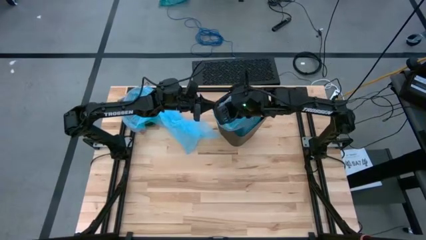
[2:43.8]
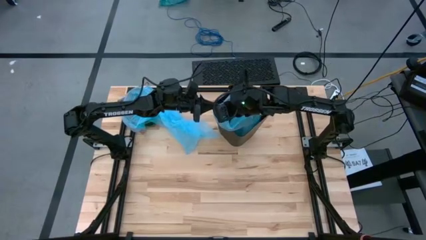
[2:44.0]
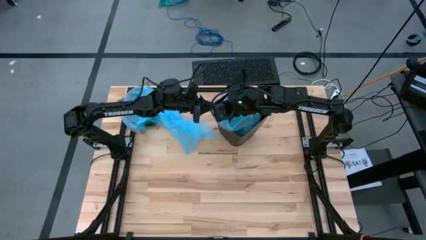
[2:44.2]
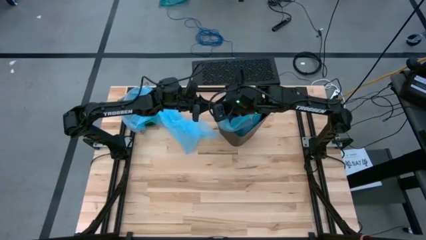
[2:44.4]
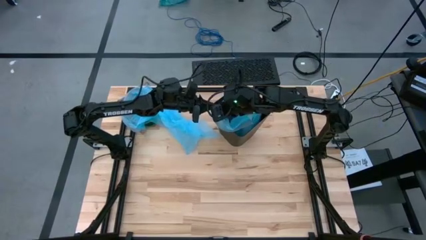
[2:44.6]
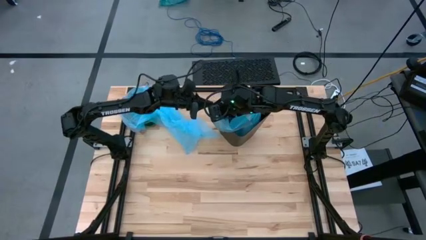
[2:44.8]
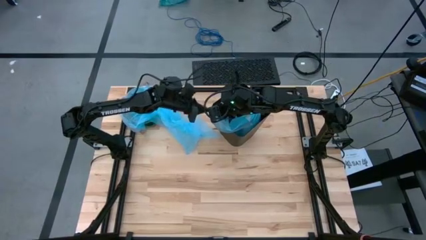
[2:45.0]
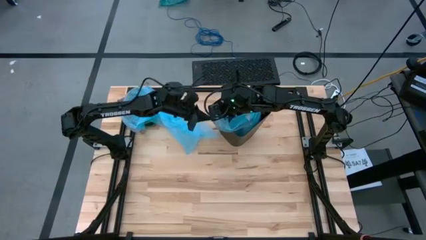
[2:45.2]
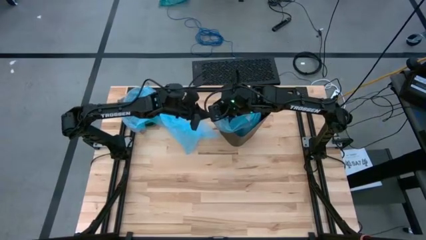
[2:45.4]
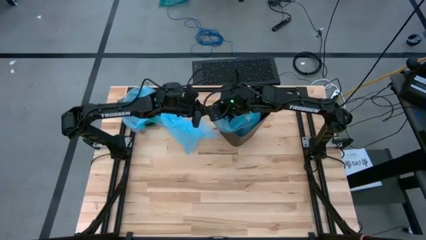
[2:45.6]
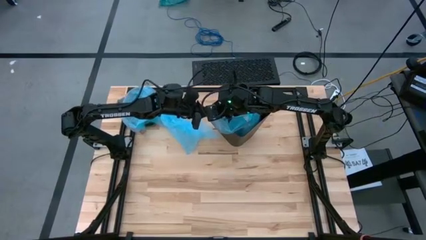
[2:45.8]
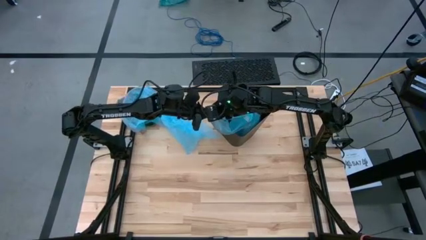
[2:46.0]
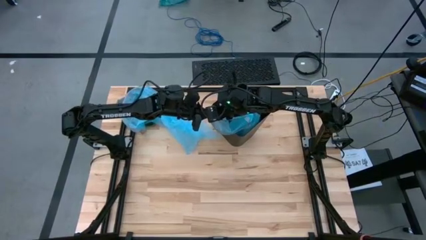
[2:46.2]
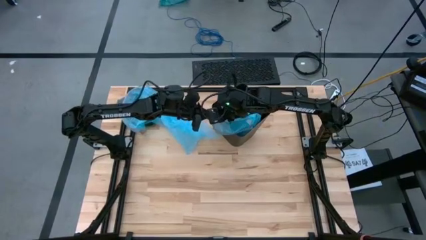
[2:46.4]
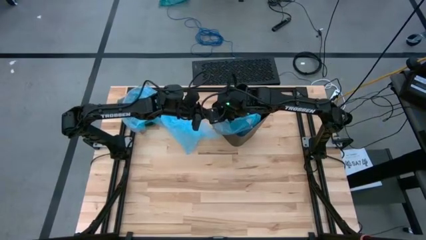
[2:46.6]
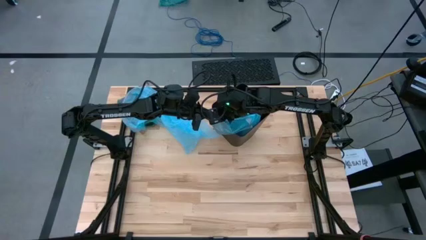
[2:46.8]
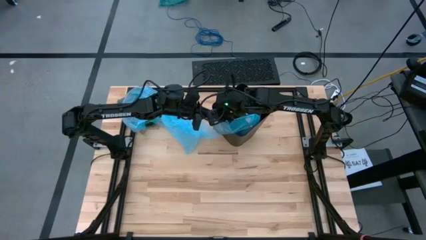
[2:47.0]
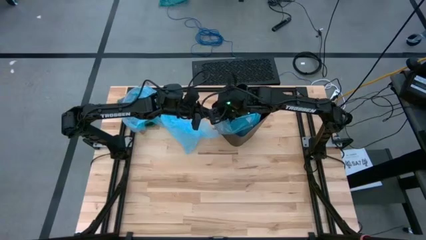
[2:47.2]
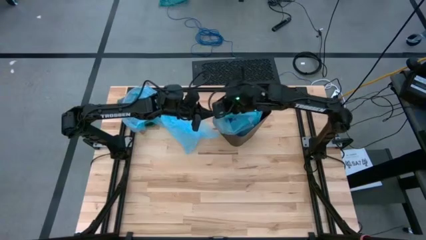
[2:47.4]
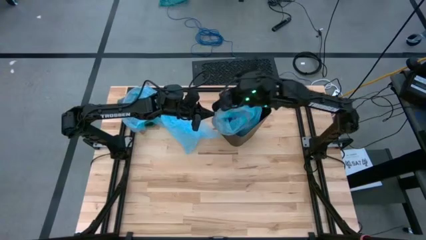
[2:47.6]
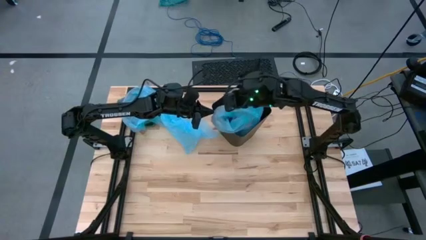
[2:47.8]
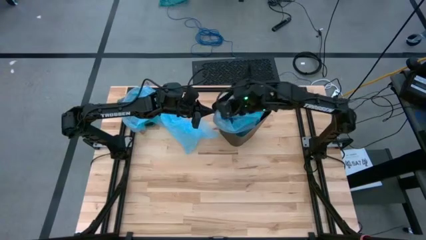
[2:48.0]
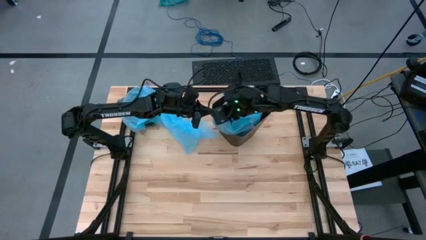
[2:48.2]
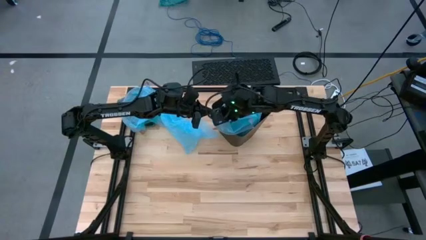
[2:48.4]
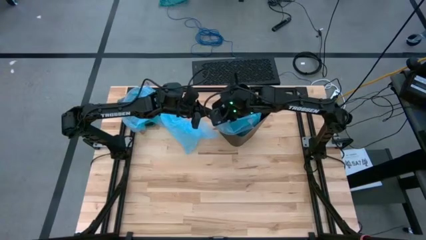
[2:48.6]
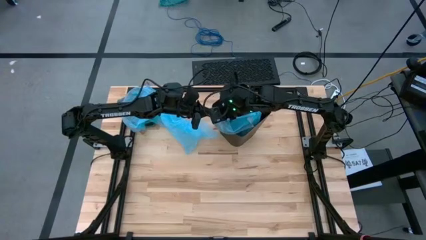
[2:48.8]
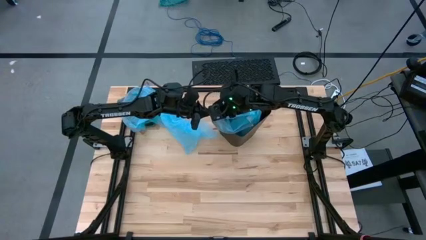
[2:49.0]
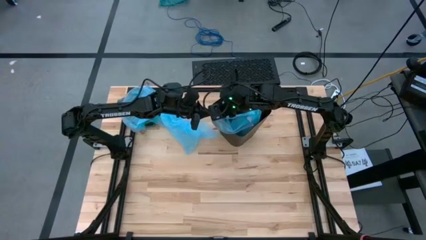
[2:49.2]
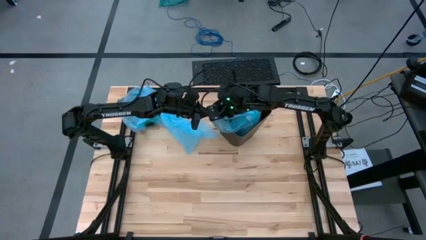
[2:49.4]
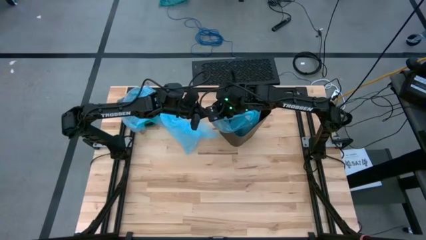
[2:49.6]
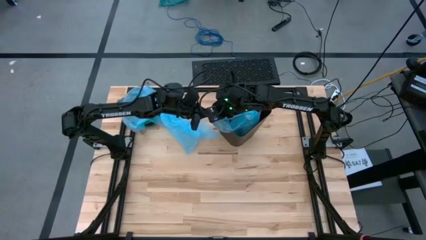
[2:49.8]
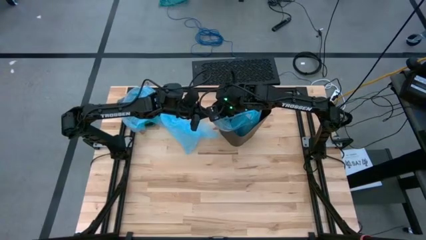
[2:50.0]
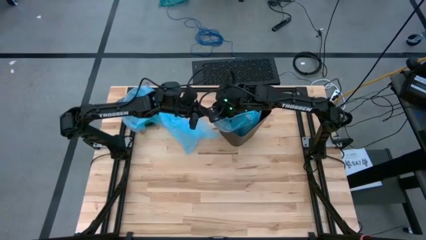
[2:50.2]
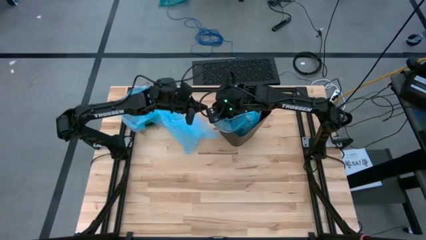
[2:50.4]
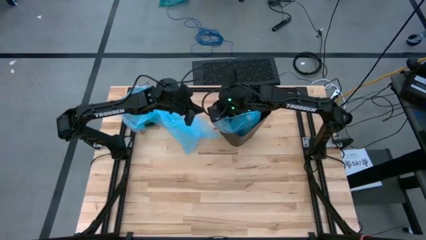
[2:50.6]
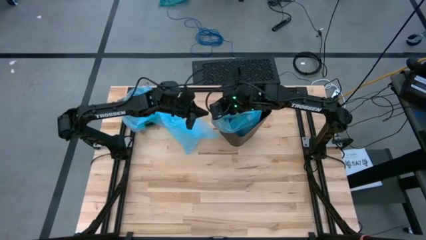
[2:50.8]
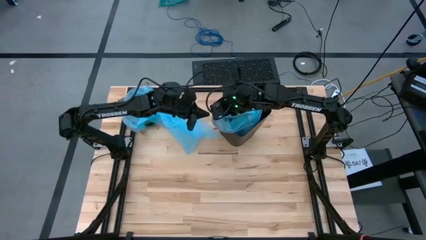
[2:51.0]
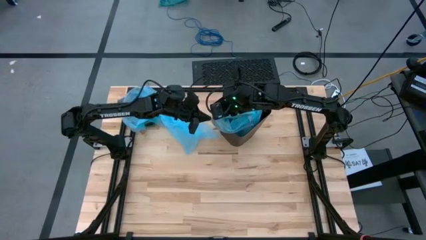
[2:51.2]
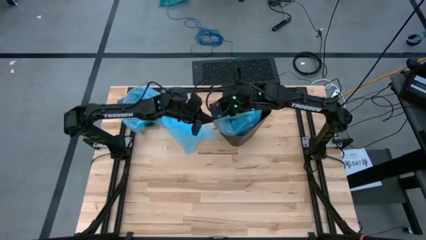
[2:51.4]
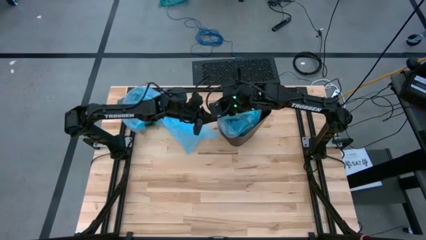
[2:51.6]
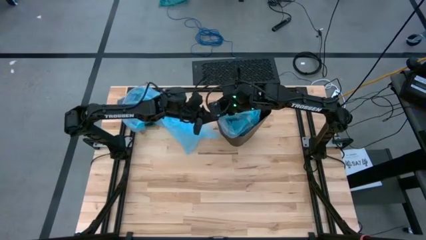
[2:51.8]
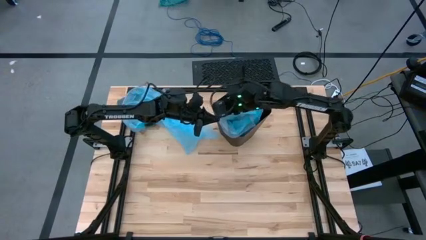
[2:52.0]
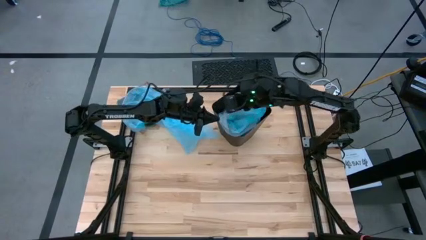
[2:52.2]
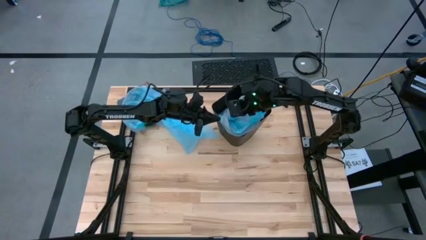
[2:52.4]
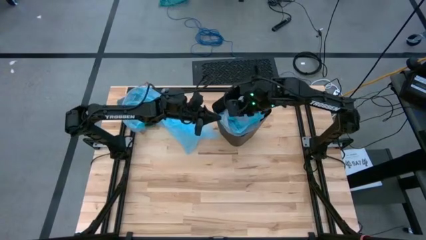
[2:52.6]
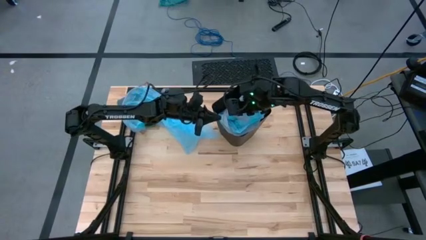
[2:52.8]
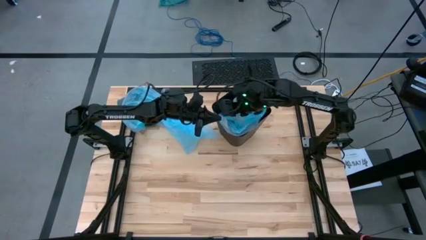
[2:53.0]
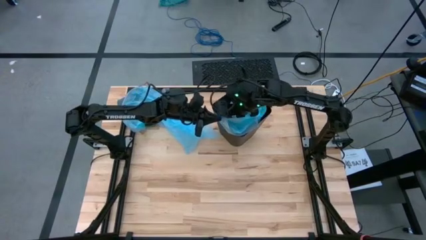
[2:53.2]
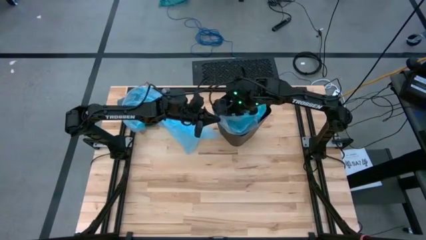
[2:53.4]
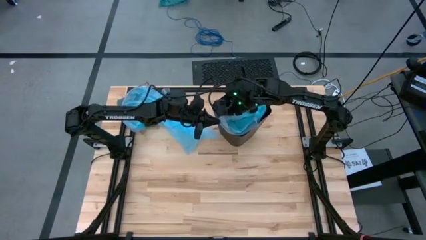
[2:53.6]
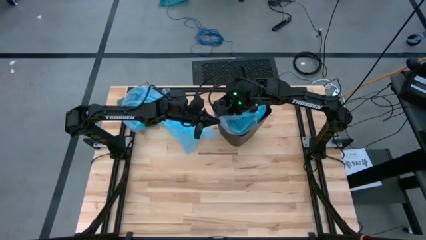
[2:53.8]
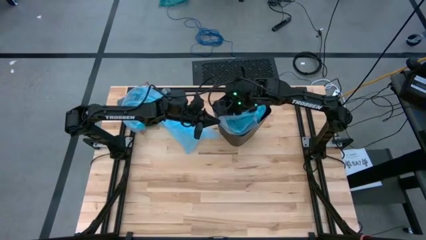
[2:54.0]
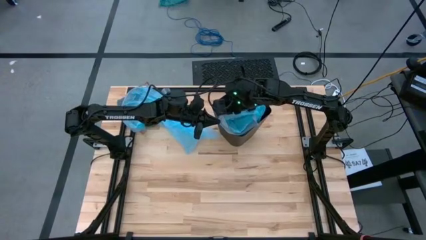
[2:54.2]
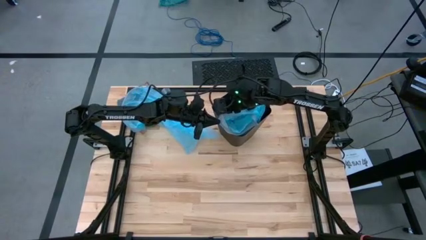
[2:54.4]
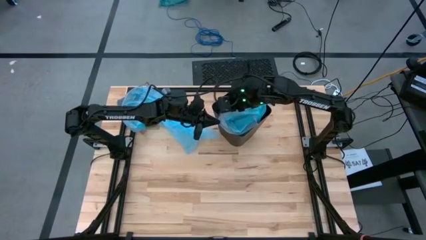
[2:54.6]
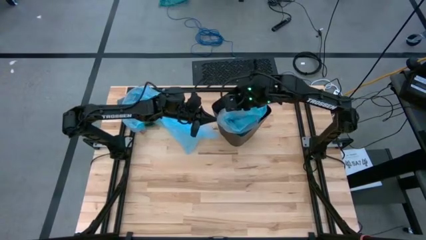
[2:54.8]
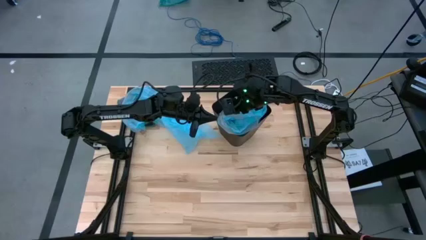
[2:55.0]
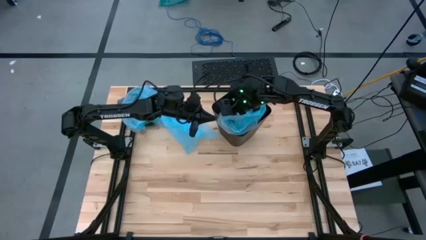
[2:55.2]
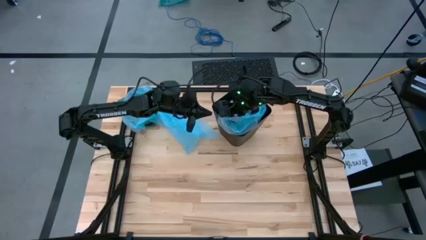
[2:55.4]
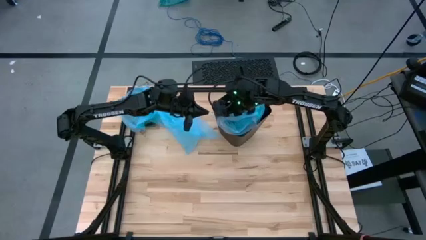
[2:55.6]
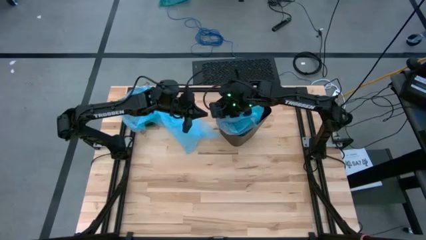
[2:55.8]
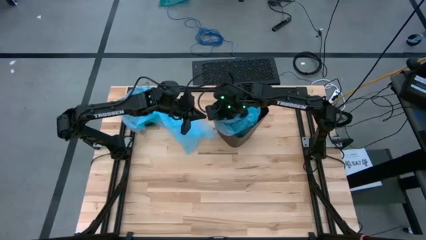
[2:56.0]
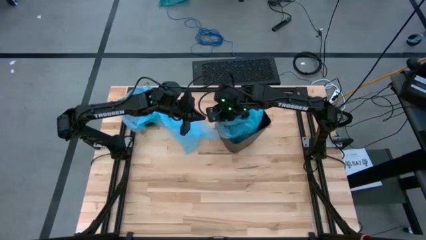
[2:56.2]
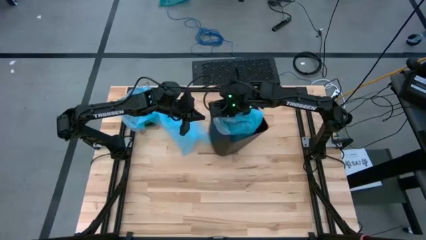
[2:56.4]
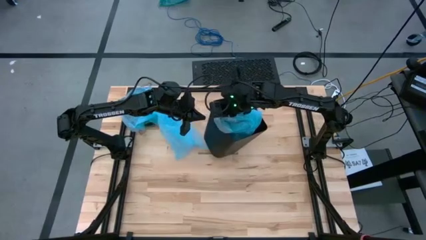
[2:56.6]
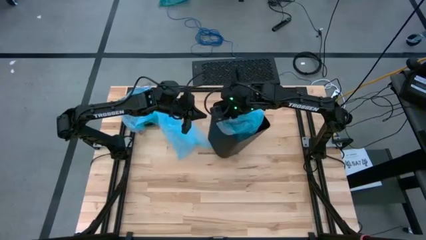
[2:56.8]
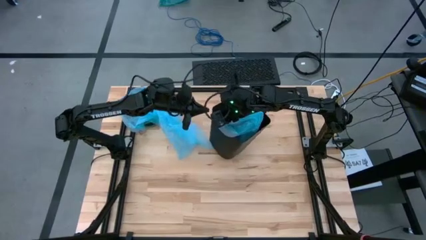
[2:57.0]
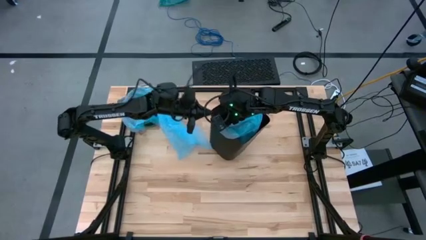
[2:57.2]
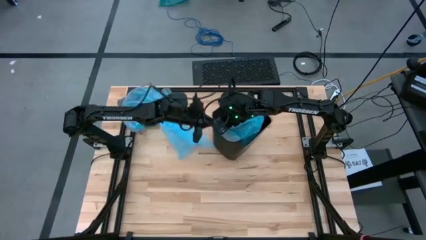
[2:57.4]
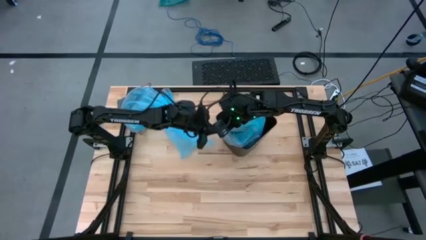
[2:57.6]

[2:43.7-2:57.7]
Task: place trash/remove bag and relplace
Remove the blue trash bag from the trash bin
